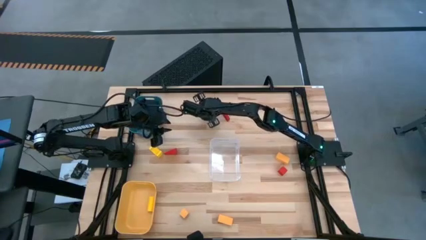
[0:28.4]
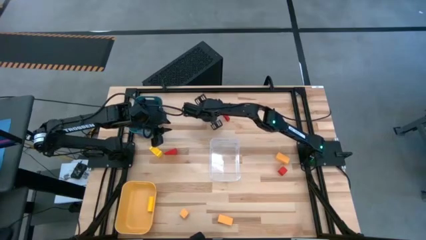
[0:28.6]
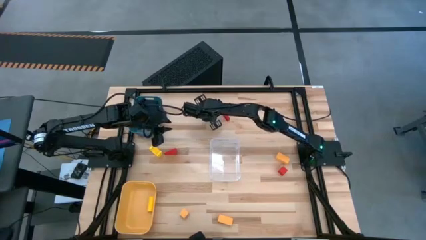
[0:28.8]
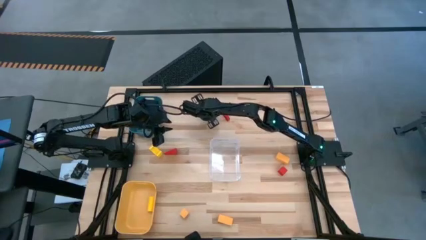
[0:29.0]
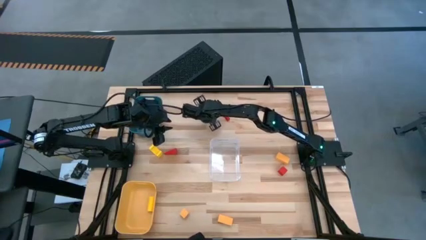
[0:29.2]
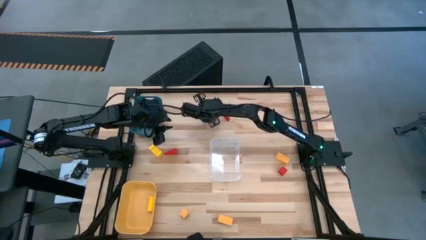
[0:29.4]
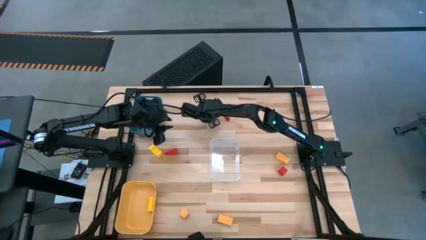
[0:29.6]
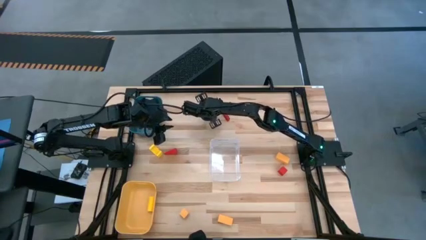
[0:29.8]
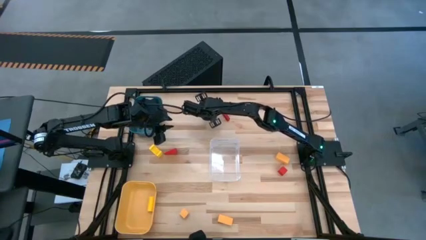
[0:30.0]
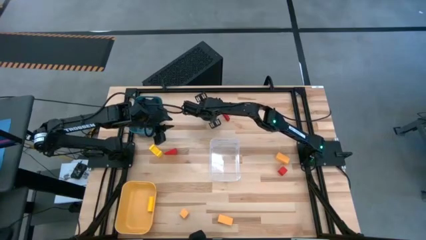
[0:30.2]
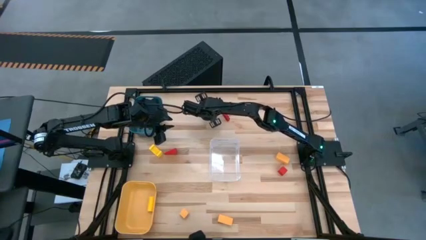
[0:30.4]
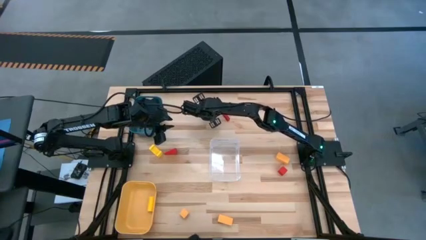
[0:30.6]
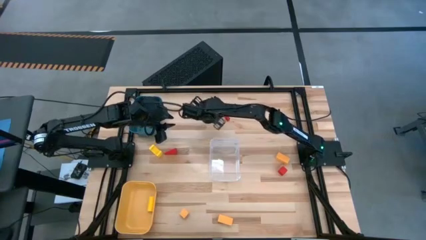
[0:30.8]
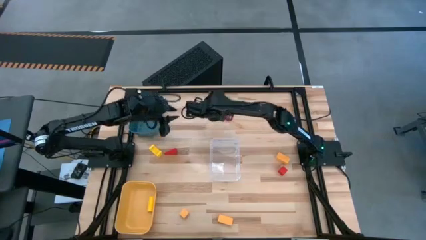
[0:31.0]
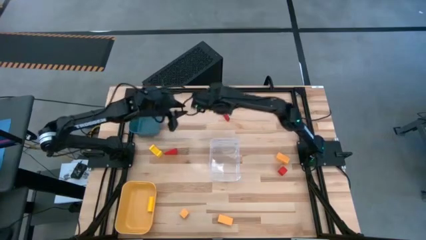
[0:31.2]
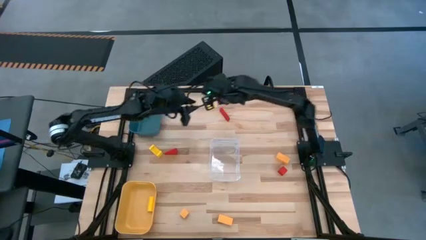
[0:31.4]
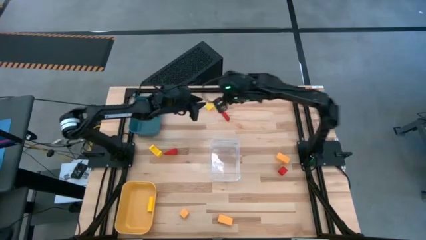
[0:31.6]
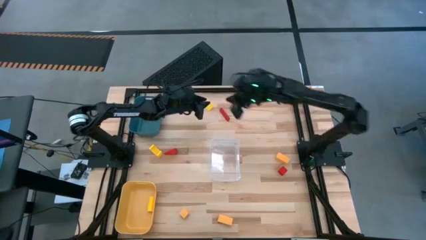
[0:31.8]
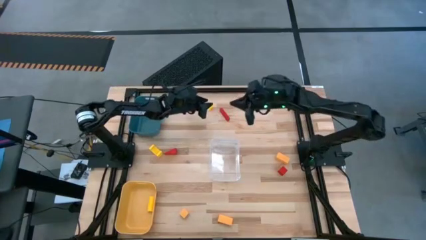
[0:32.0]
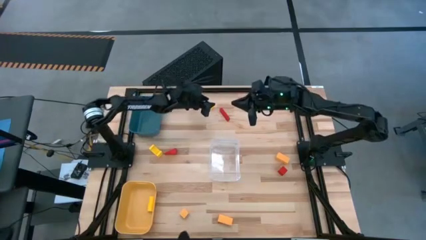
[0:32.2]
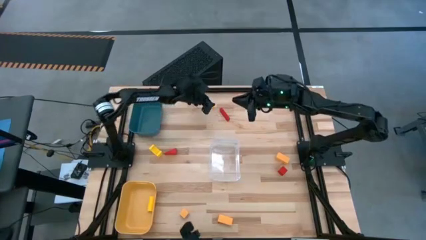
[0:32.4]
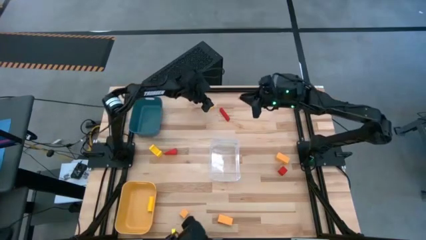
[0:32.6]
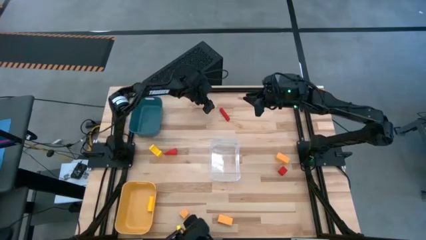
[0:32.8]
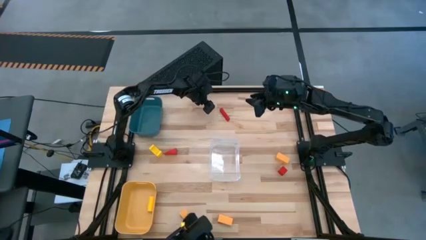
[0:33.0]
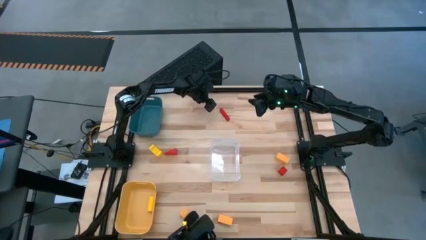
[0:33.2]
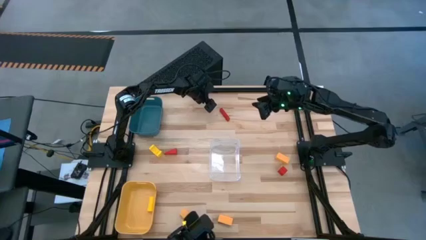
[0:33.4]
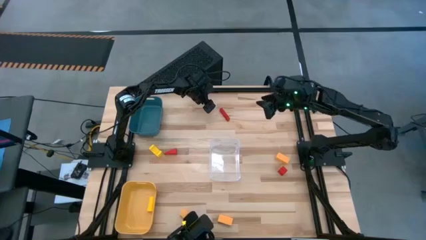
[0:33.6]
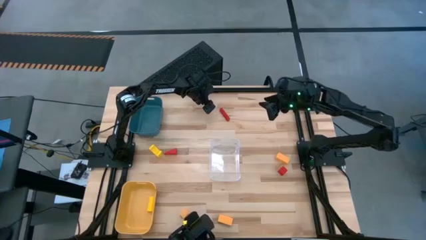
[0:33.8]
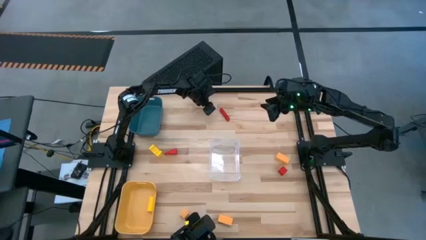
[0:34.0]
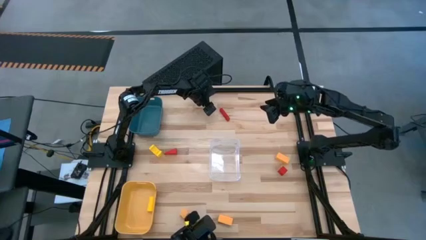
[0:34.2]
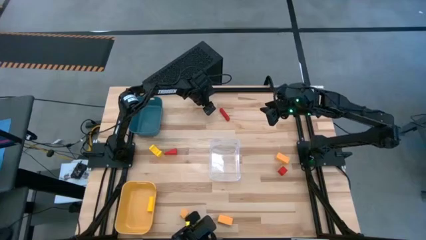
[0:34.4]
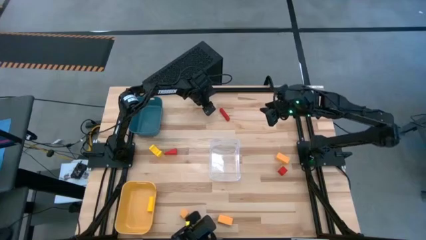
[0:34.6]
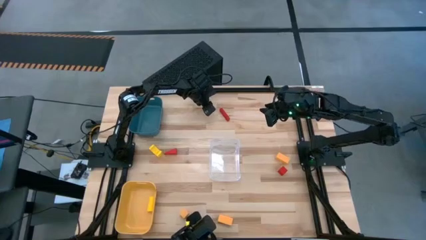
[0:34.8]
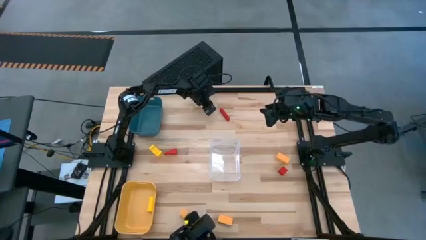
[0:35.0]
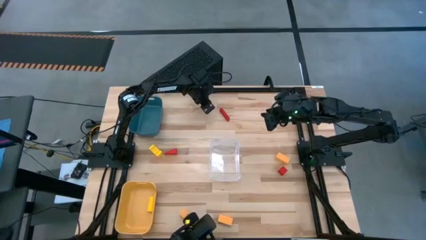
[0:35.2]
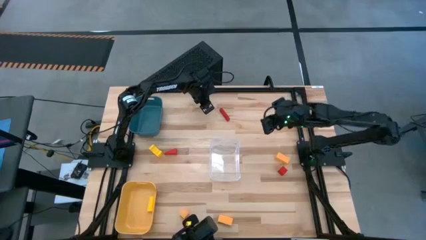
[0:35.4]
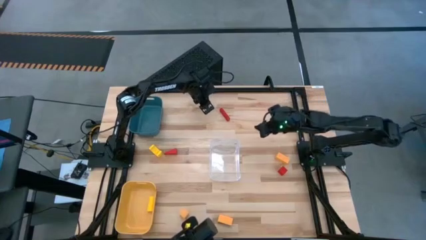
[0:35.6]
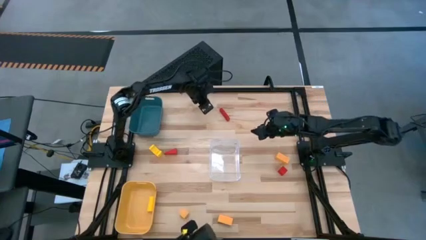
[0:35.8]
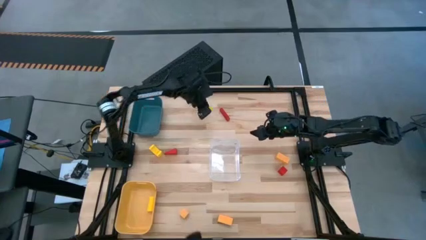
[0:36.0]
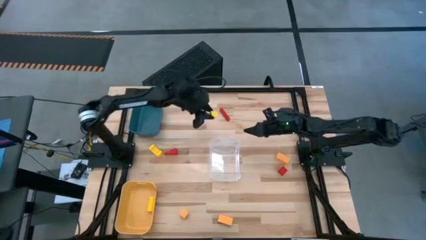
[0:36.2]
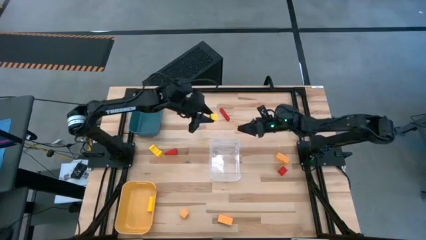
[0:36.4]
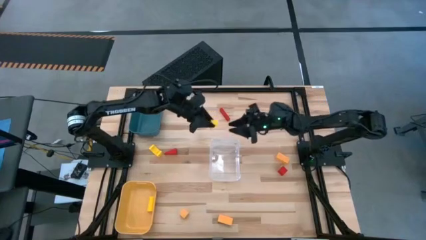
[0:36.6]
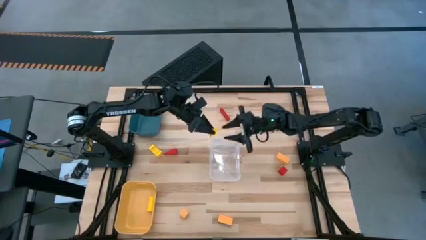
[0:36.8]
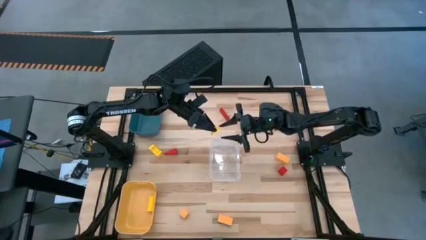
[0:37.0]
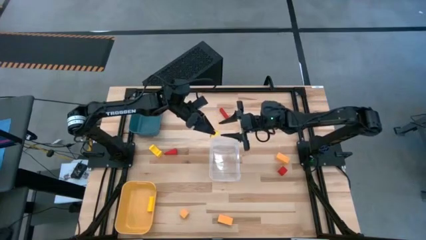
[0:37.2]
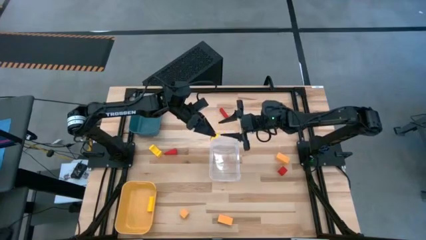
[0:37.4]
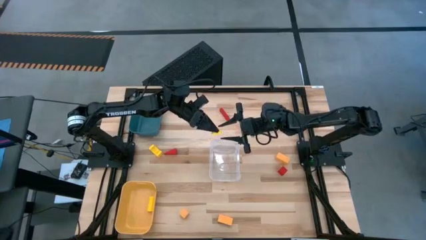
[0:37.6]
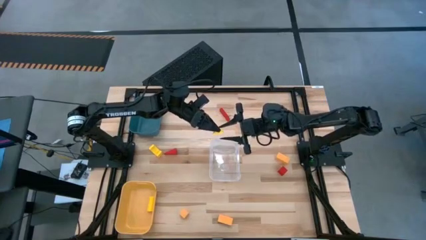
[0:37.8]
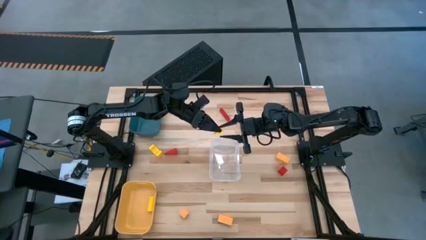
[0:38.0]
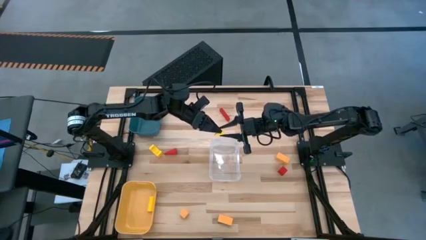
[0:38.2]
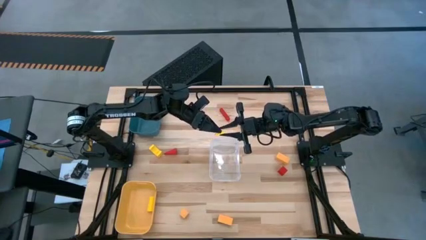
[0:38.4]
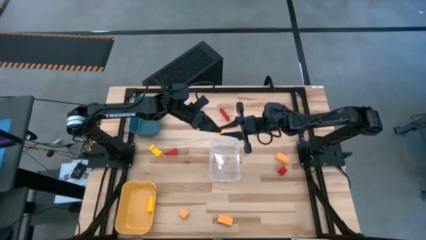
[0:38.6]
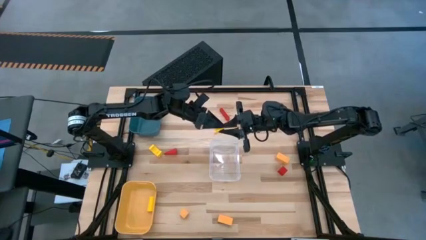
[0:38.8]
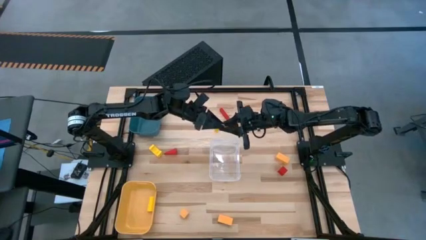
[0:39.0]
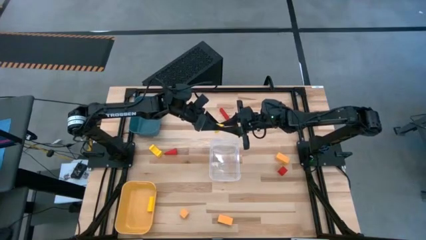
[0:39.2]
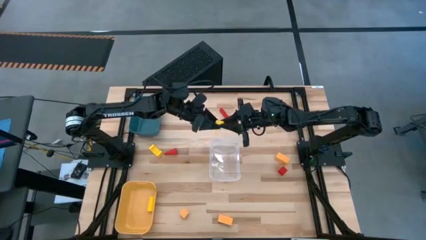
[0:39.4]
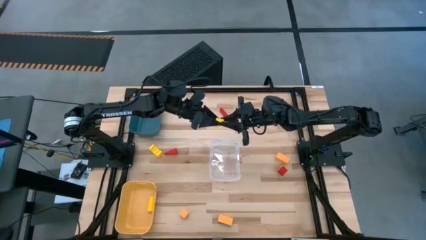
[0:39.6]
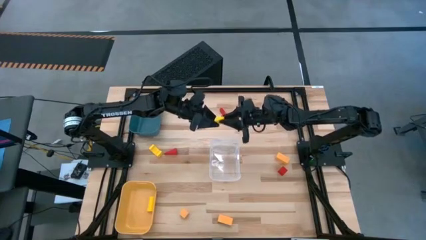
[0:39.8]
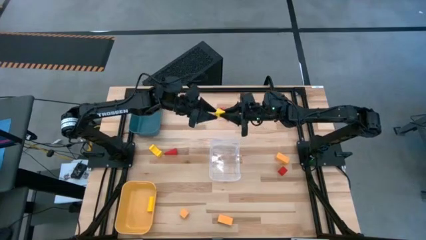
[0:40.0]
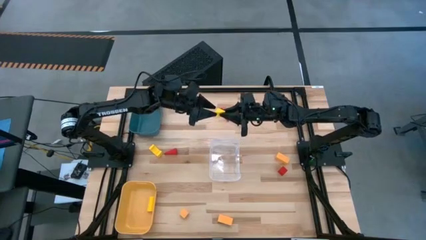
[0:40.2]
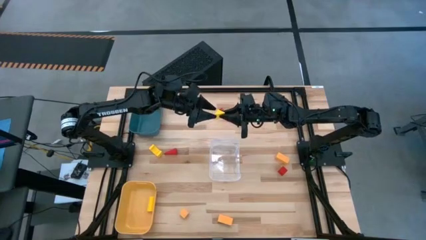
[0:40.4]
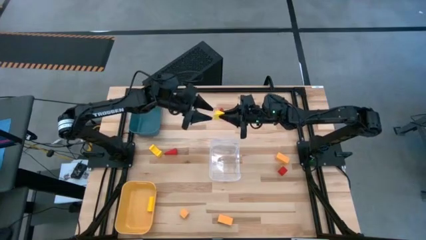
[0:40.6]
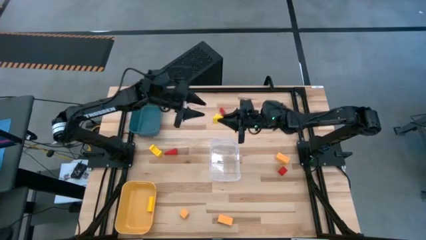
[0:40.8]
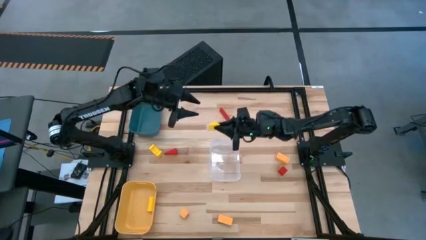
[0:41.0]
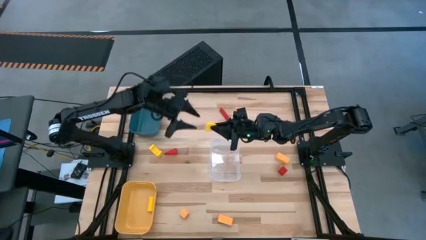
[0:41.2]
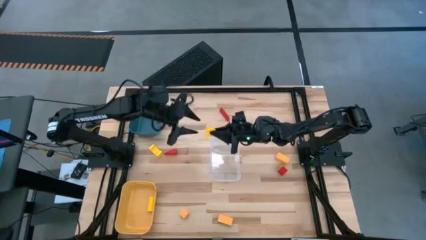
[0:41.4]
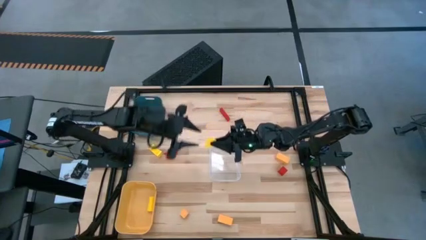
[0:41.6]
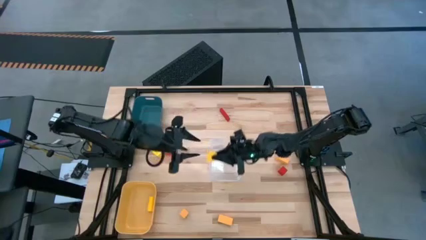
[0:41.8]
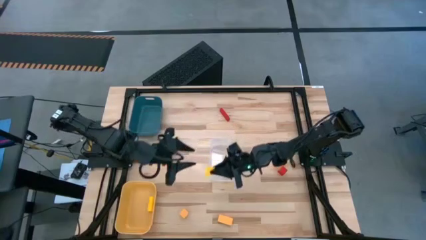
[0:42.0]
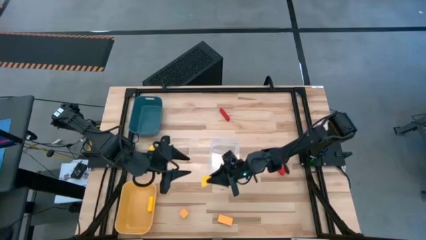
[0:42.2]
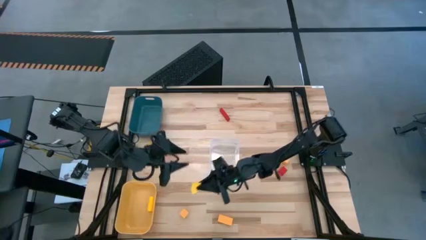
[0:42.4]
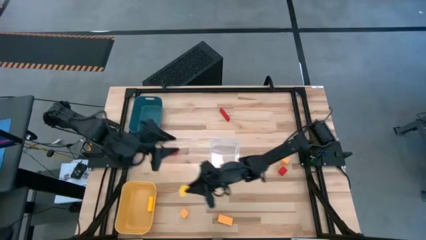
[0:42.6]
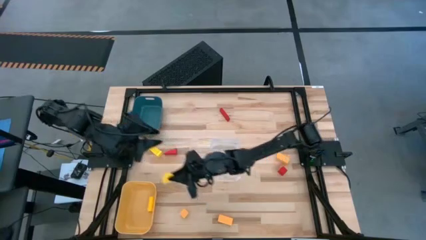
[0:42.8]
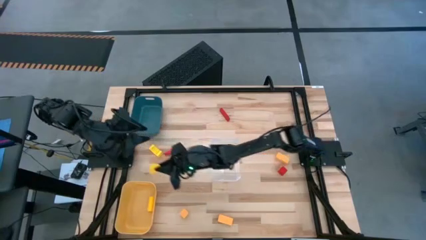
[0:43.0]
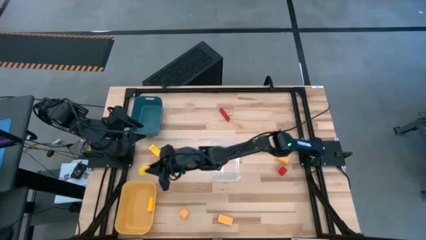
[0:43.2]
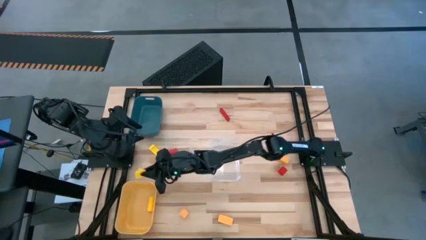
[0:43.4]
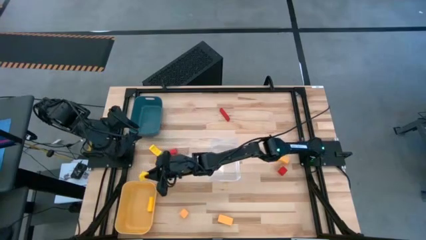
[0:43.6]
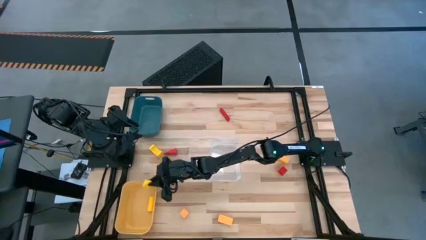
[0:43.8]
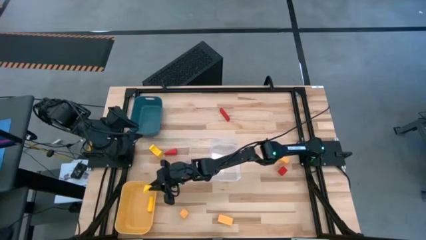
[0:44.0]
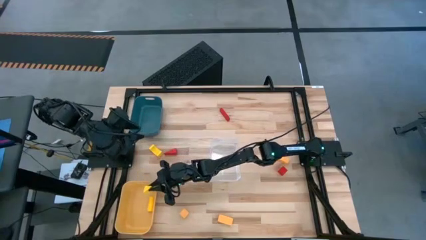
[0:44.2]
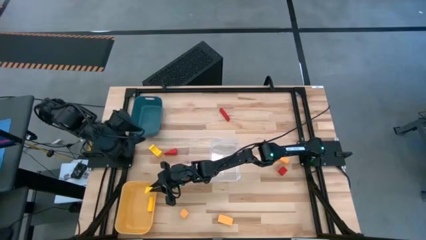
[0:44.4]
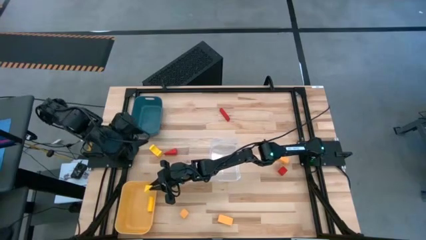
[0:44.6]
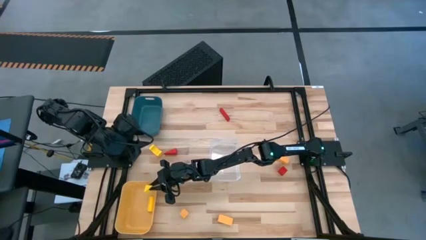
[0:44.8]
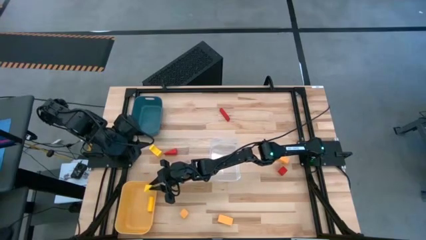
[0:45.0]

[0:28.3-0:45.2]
Task: Sort & place blocks by color
Put the top yellow block into the yellow bin
